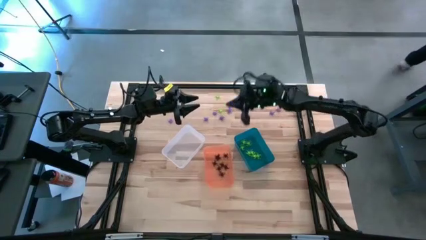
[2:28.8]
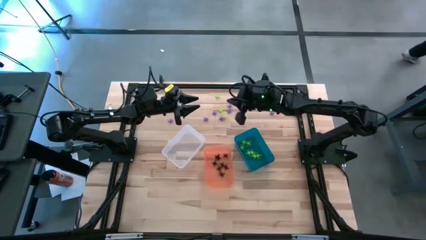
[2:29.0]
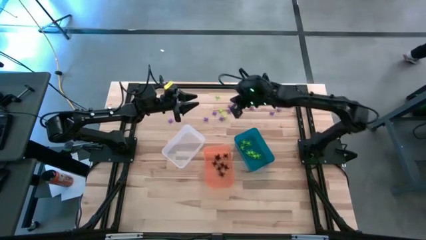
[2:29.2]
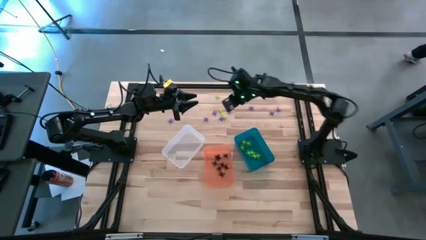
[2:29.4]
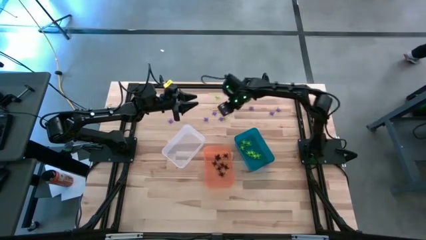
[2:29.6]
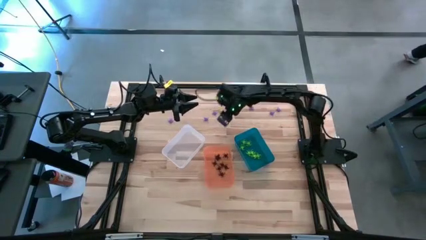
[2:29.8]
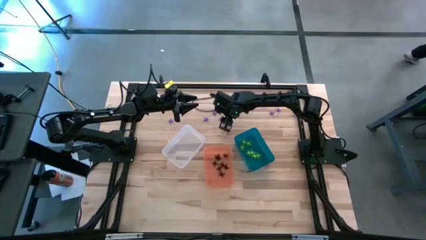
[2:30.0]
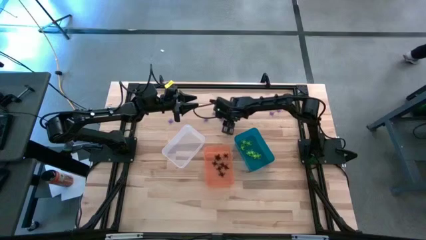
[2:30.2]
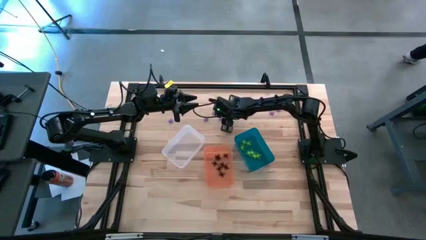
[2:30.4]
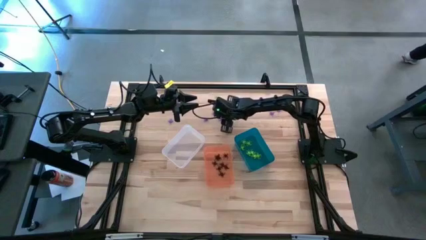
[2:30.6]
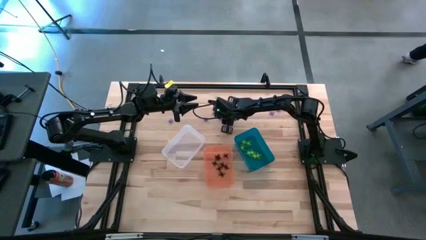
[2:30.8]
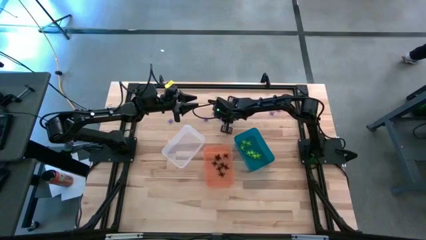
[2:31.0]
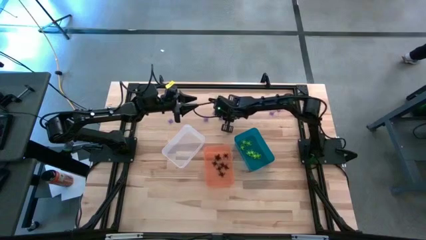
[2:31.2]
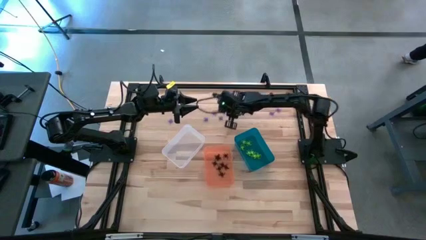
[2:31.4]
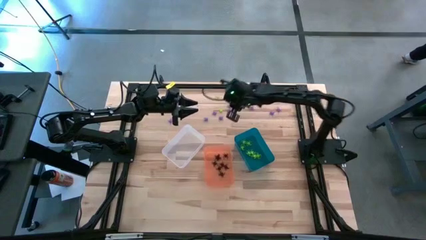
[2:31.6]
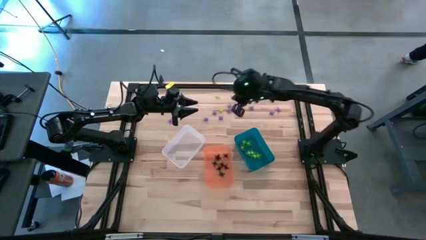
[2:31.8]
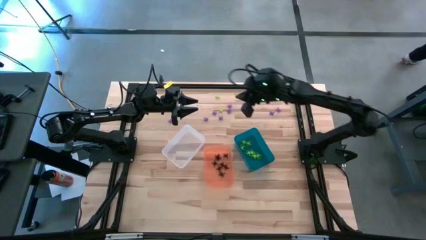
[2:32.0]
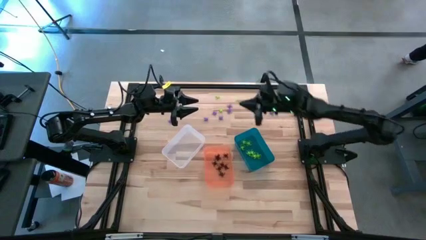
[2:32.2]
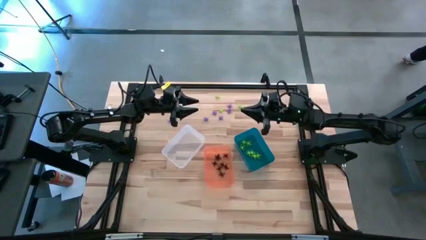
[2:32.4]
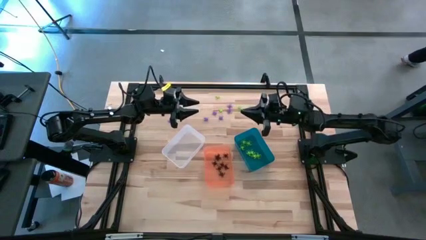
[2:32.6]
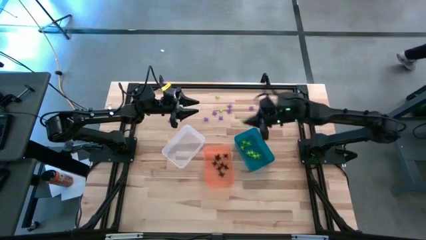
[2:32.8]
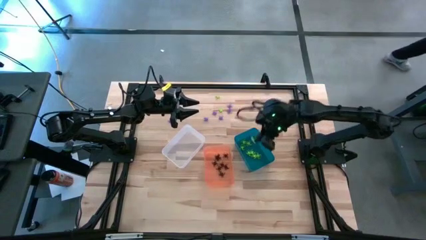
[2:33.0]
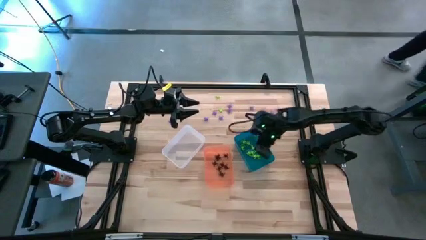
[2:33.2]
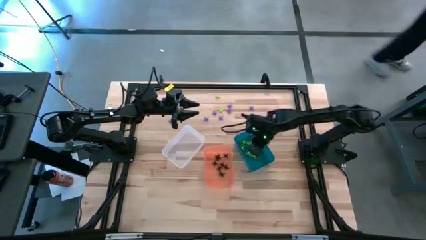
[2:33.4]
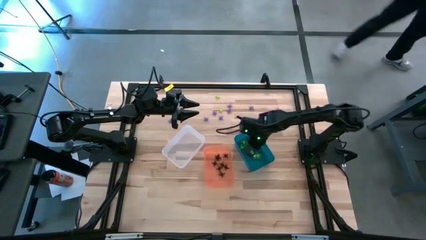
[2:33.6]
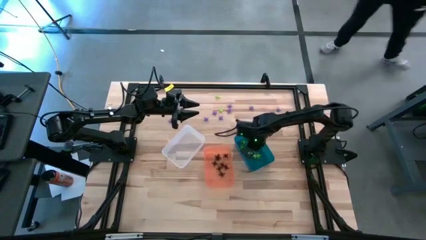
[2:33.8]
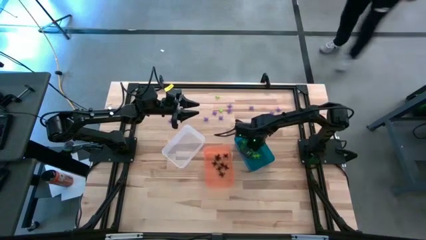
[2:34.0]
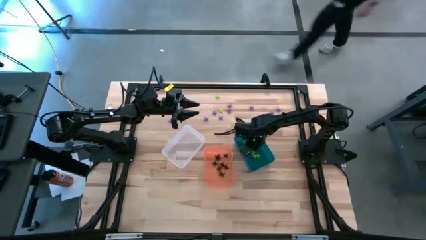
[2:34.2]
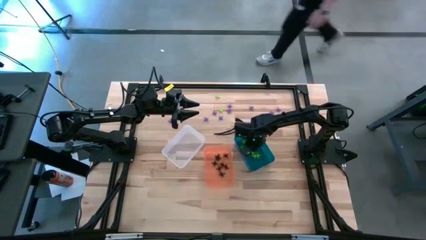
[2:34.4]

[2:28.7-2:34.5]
Task: Sort Halloween decoration
Put the green spider toy into the blue bin

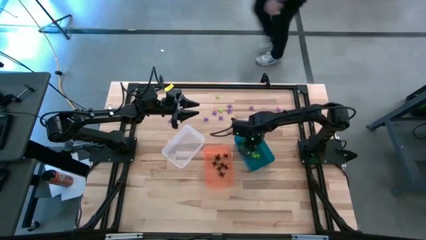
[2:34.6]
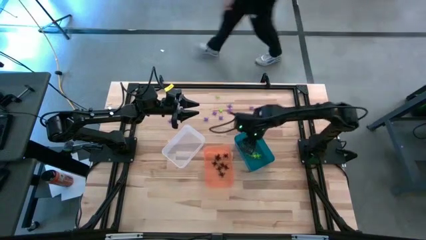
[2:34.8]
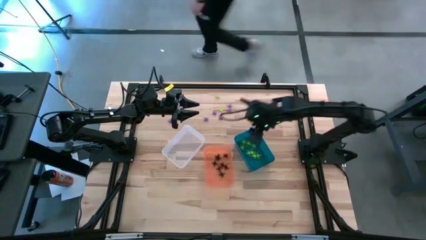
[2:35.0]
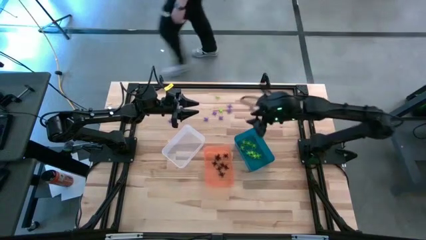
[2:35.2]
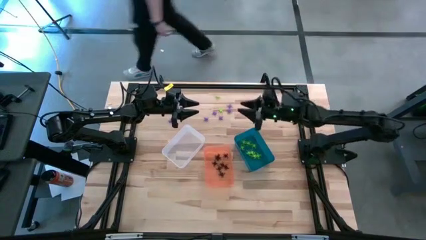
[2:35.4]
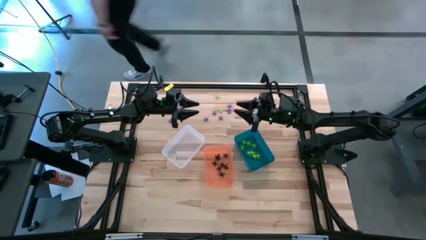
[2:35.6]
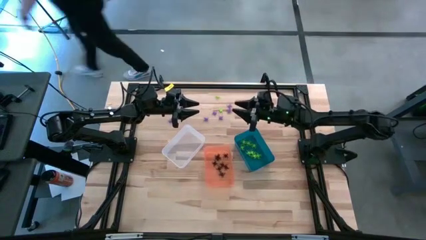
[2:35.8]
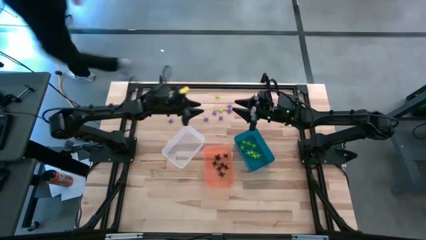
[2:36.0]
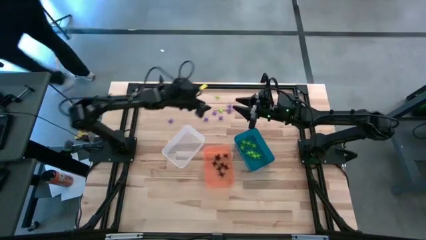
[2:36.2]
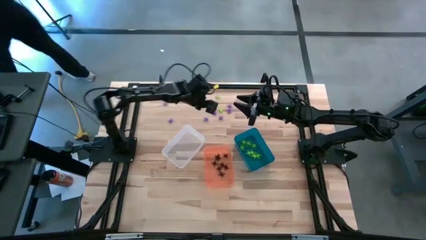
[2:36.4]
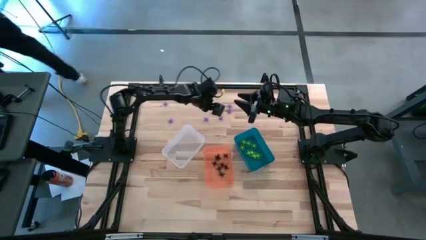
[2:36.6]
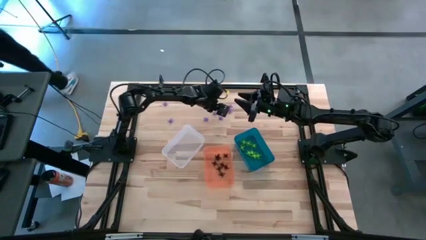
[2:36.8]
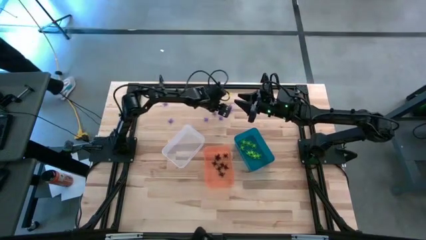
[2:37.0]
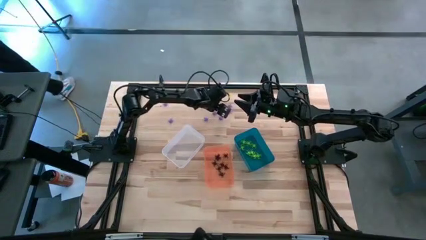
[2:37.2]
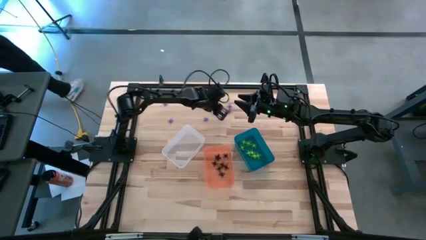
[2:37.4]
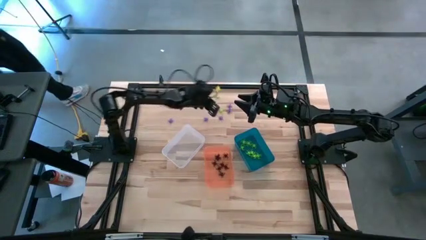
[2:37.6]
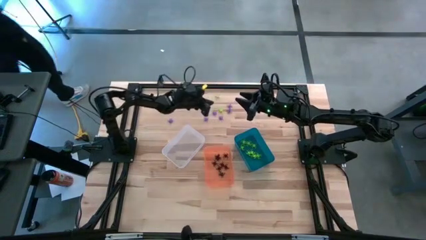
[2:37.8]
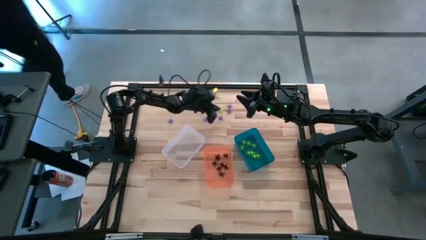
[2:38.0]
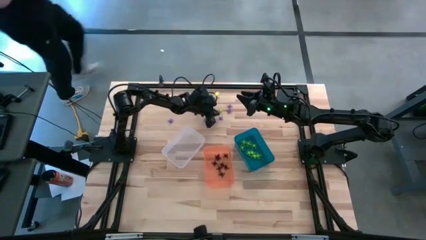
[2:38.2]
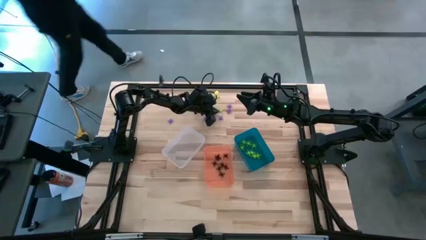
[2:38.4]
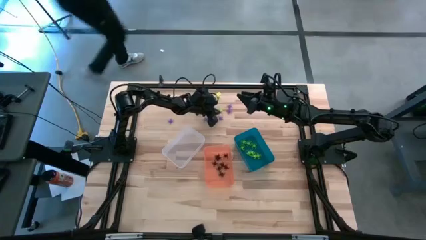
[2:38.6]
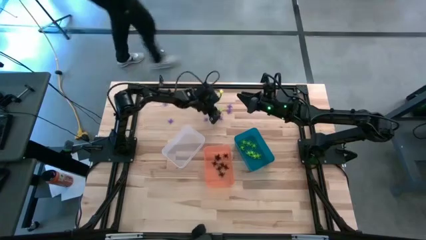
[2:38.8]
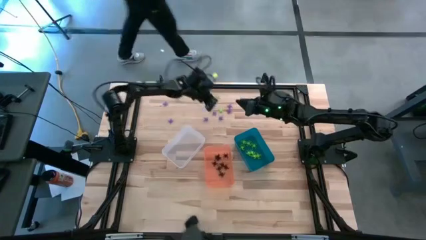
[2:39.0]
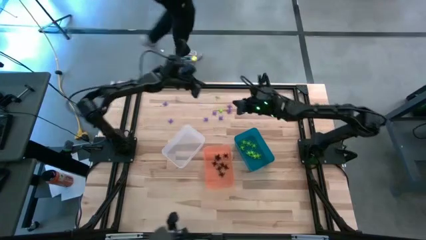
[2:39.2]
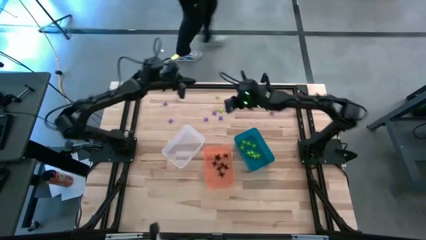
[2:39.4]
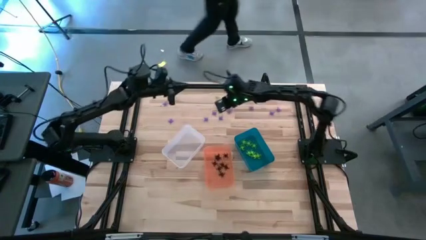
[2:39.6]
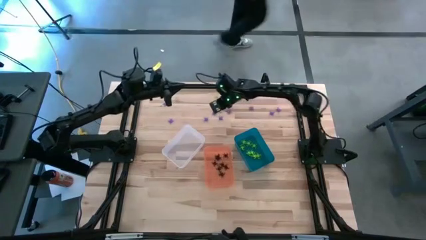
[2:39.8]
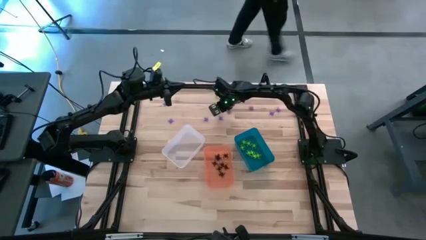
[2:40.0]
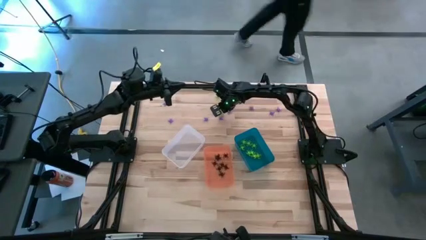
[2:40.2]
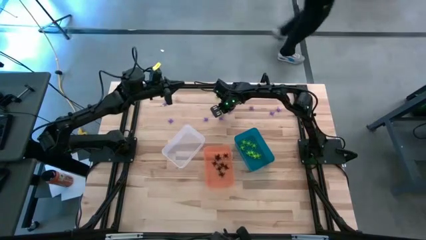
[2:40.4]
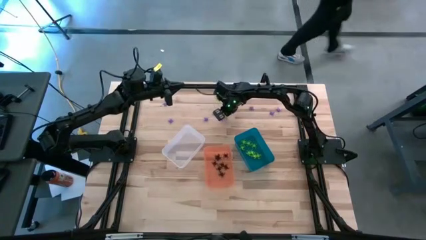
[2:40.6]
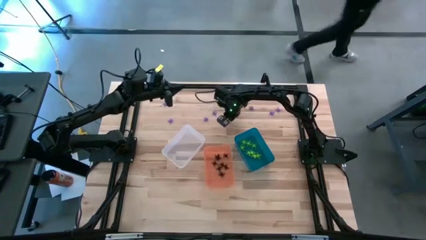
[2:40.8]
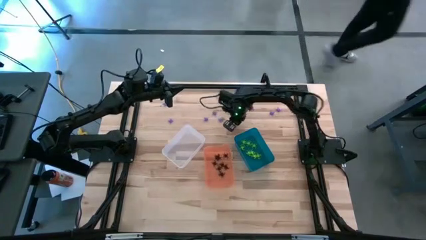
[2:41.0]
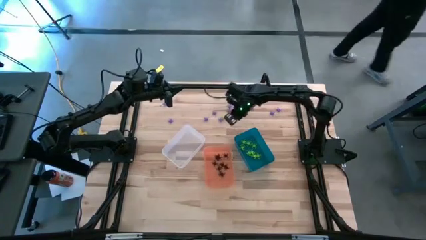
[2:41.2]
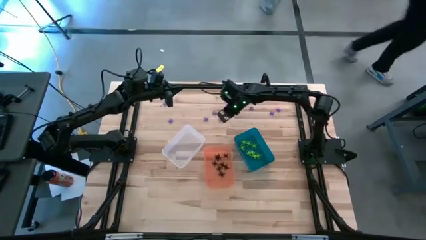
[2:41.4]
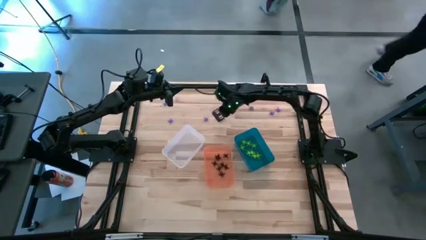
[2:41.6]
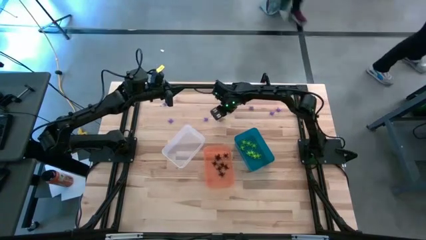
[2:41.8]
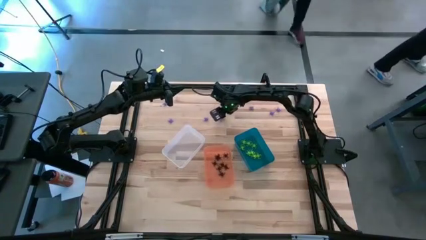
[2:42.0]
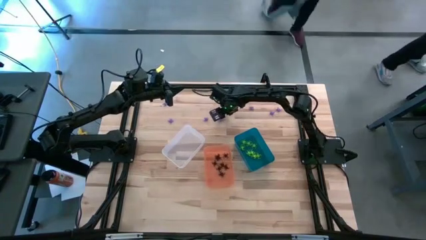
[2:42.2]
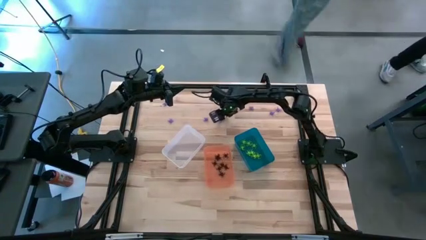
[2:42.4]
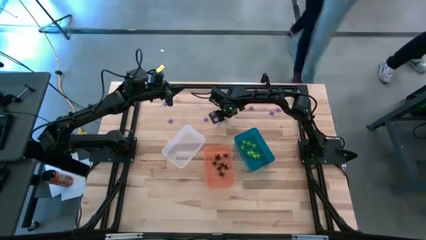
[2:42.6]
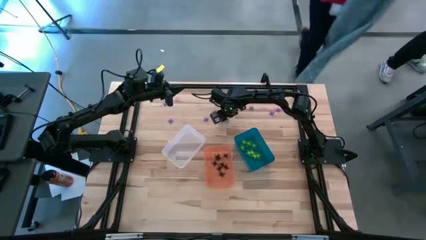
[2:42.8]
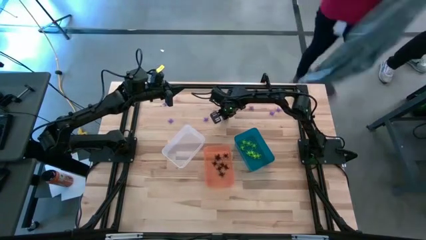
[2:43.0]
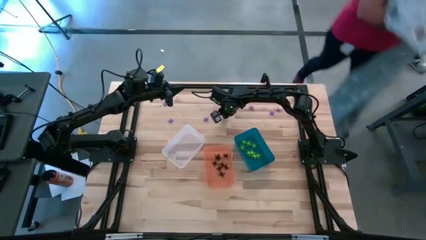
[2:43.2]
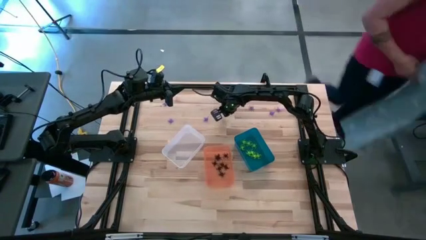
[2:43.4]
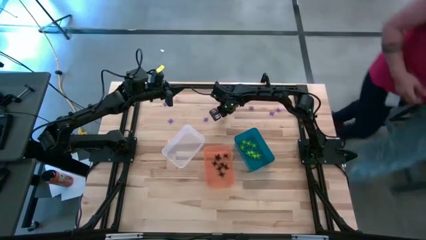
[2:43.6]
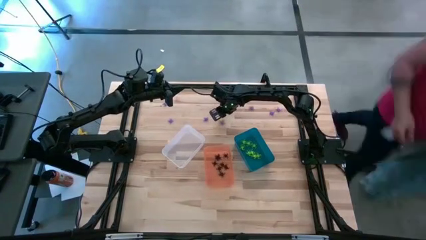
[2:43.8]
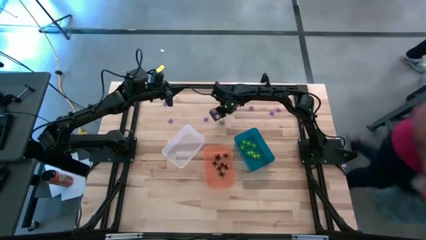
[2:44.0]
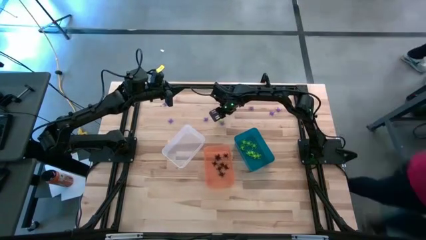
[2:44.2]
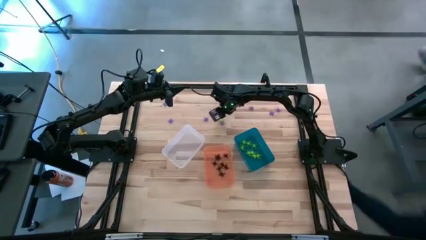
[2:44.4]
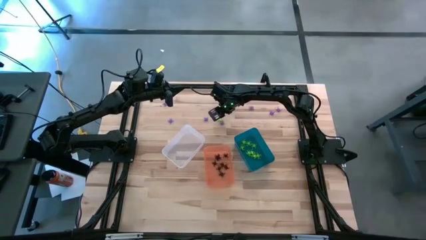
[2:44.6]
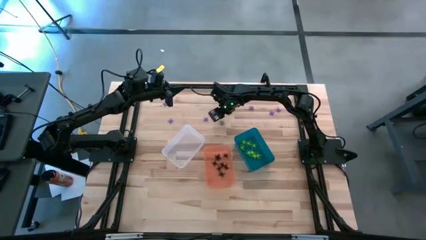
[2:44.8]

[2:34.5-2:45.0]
Put the green spider toy into the blue bin
